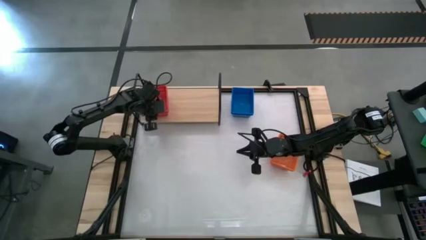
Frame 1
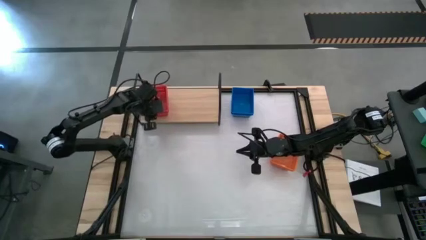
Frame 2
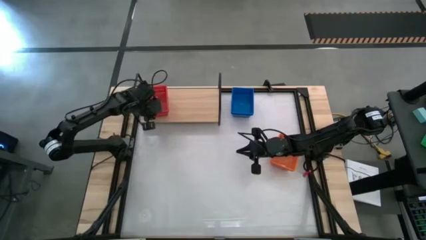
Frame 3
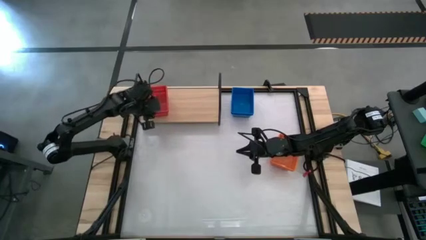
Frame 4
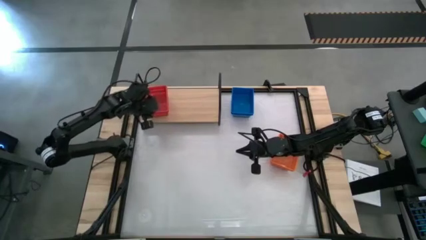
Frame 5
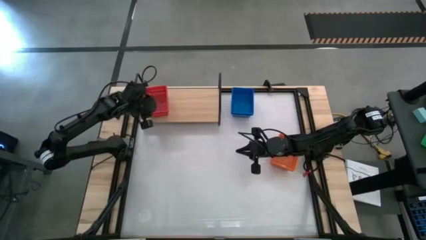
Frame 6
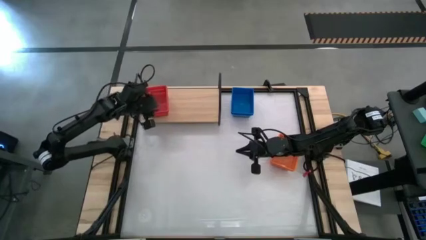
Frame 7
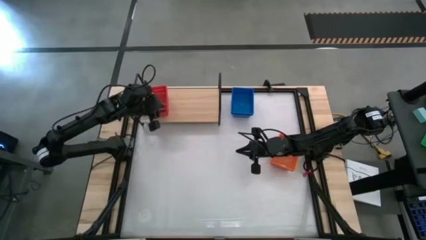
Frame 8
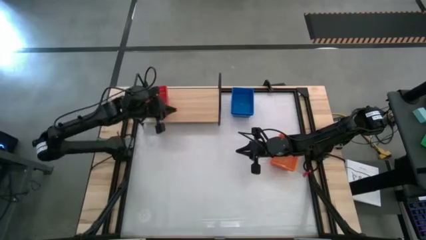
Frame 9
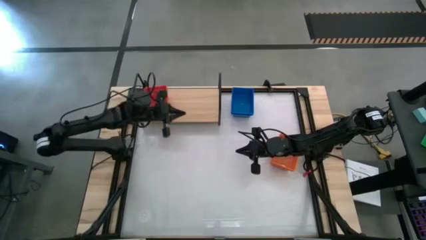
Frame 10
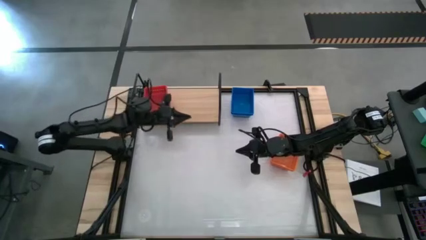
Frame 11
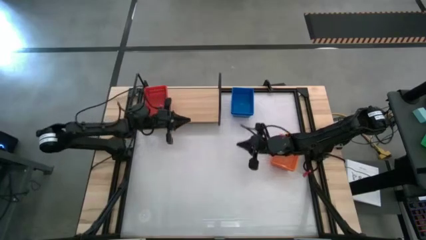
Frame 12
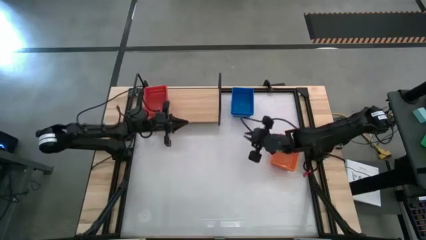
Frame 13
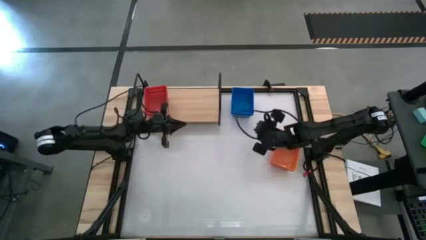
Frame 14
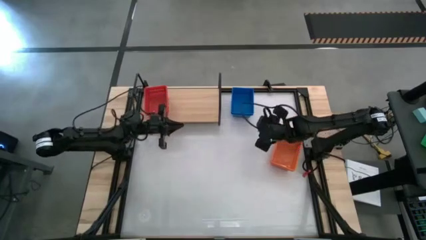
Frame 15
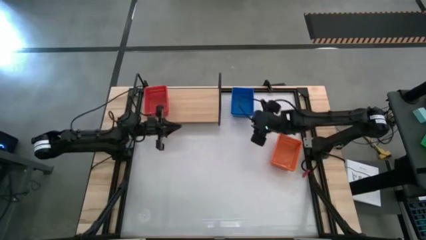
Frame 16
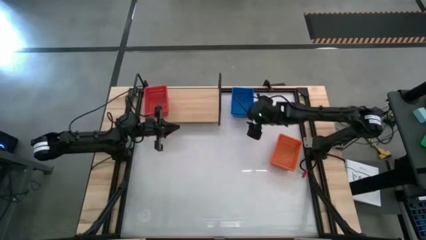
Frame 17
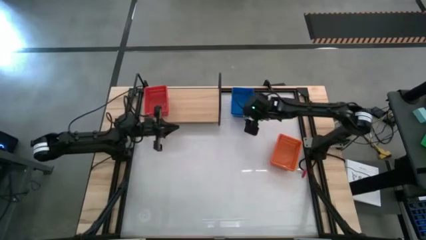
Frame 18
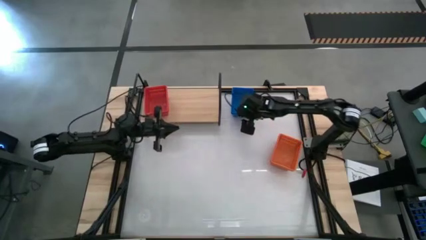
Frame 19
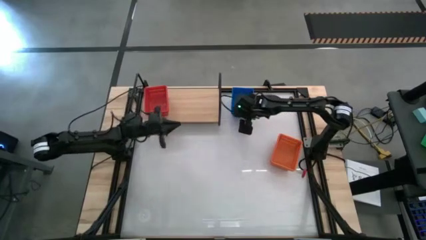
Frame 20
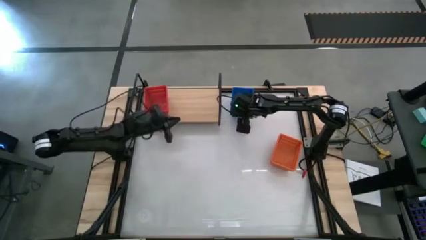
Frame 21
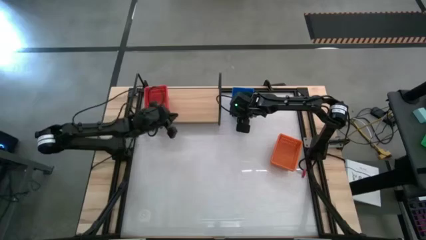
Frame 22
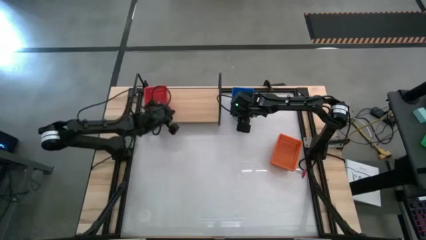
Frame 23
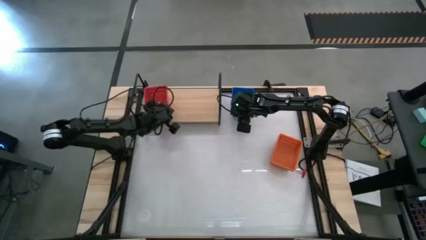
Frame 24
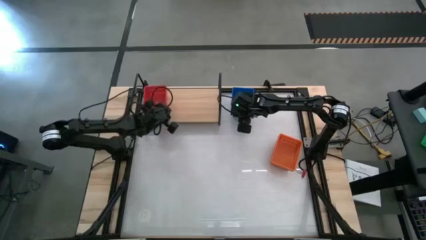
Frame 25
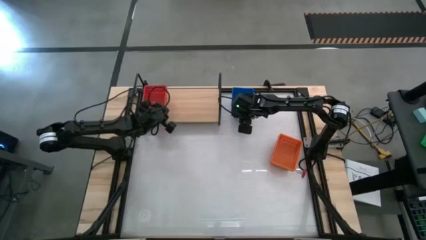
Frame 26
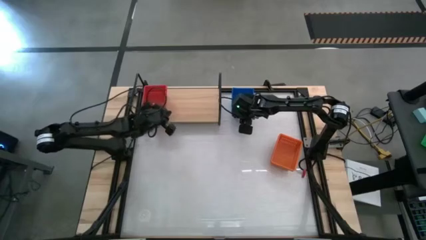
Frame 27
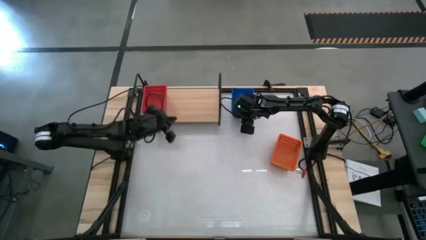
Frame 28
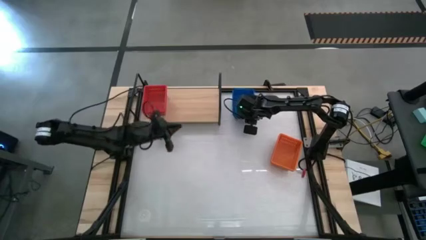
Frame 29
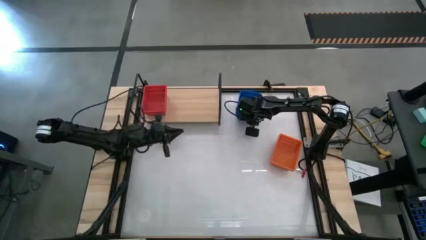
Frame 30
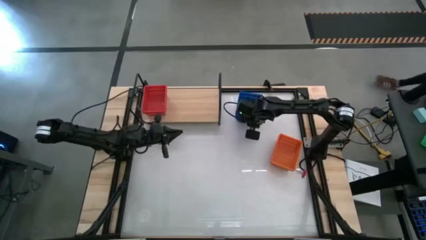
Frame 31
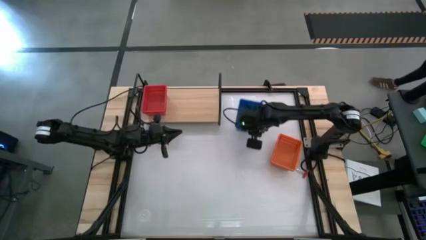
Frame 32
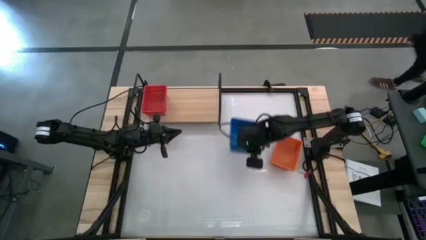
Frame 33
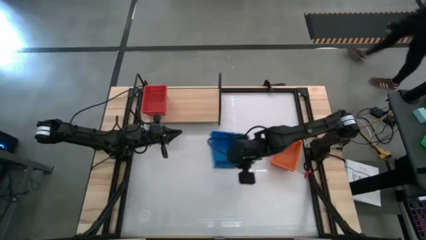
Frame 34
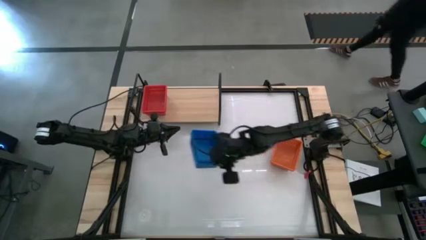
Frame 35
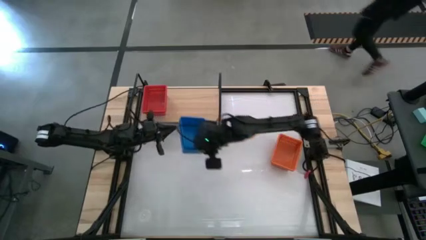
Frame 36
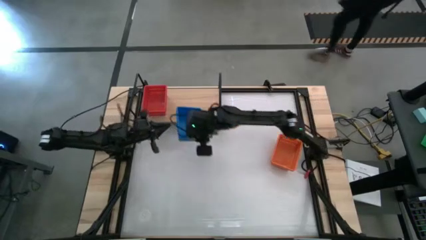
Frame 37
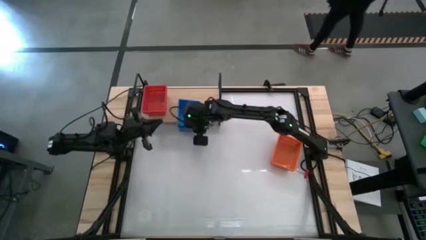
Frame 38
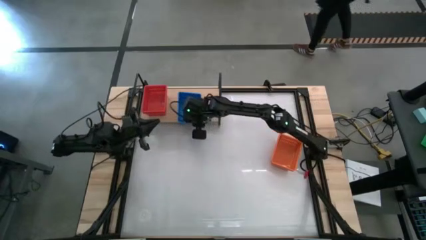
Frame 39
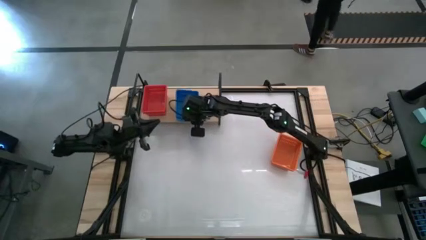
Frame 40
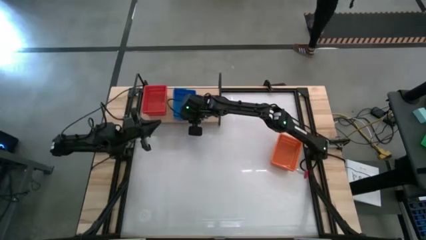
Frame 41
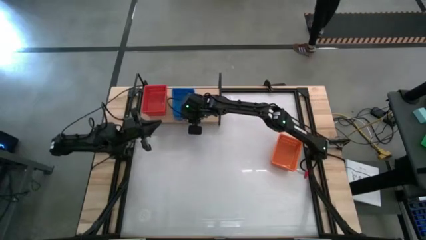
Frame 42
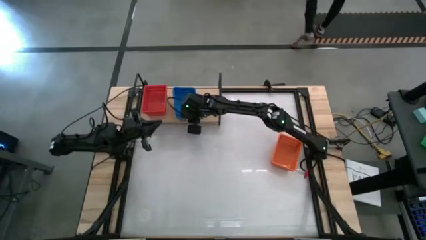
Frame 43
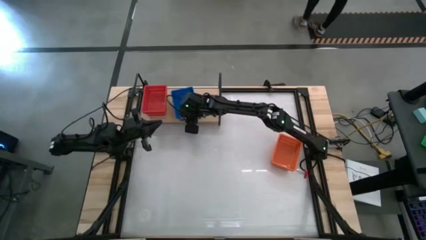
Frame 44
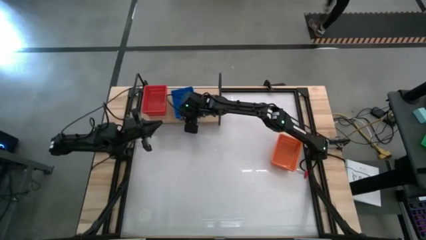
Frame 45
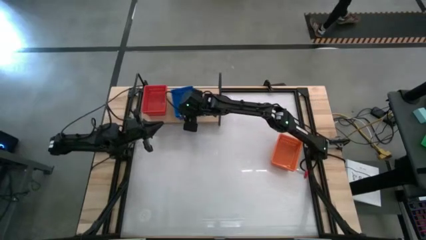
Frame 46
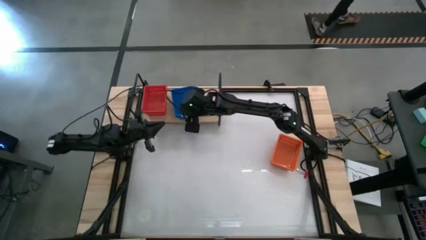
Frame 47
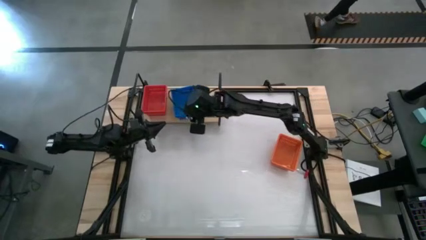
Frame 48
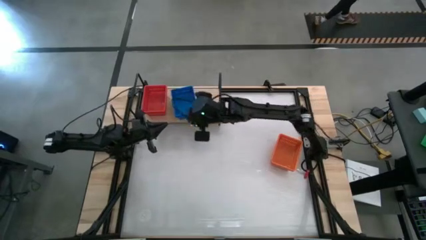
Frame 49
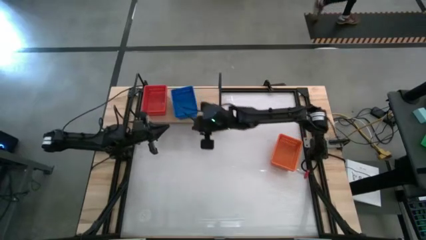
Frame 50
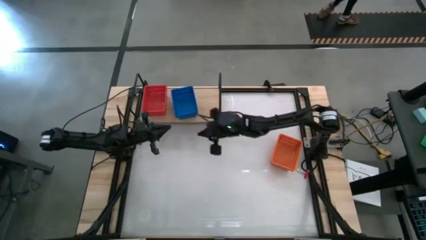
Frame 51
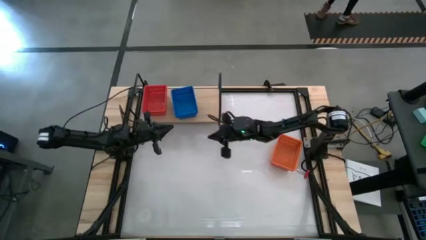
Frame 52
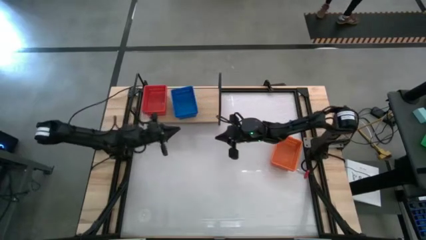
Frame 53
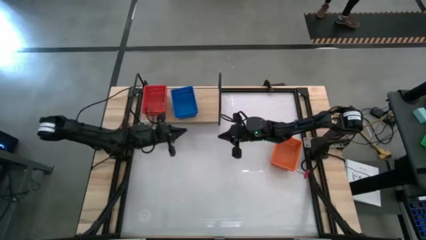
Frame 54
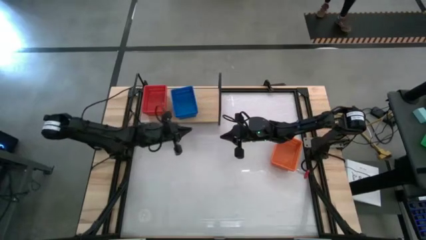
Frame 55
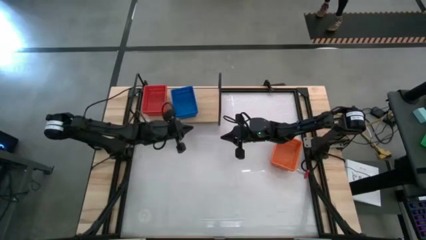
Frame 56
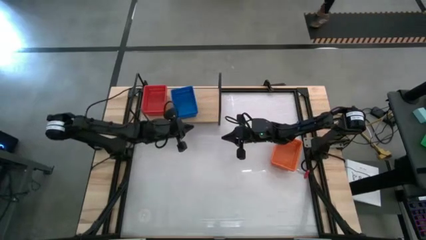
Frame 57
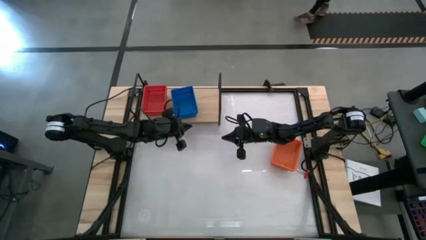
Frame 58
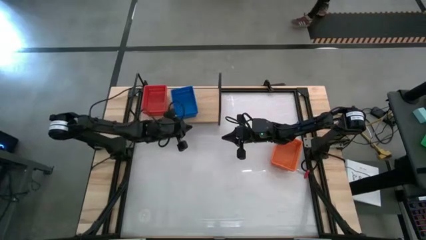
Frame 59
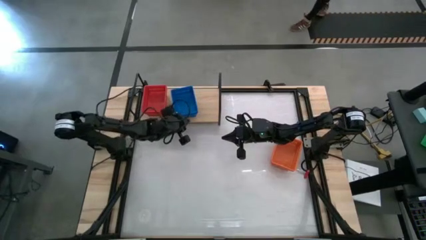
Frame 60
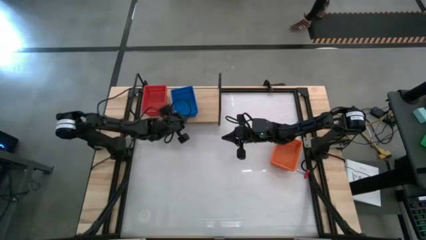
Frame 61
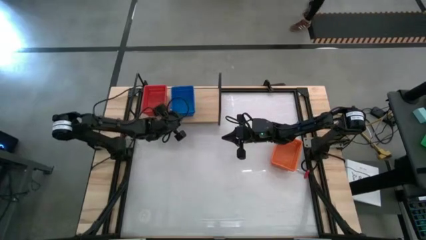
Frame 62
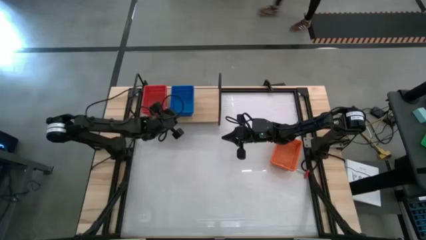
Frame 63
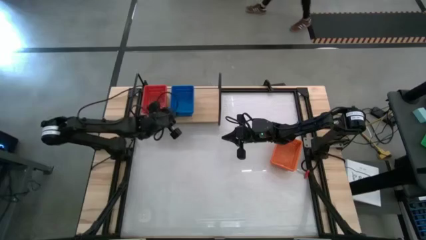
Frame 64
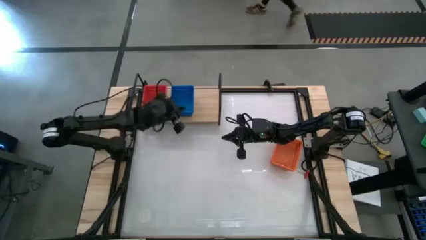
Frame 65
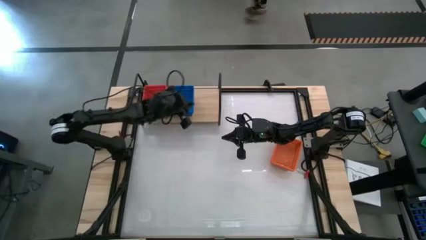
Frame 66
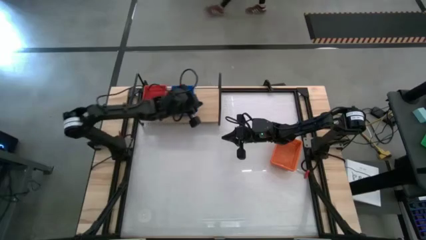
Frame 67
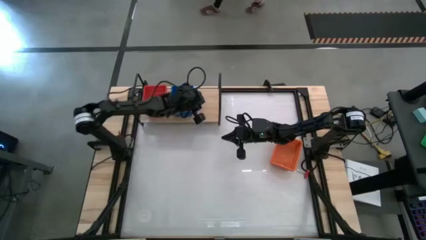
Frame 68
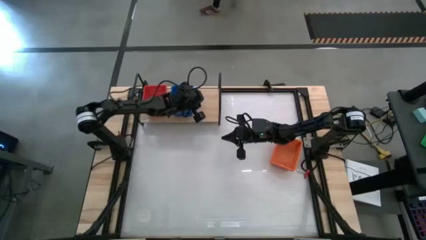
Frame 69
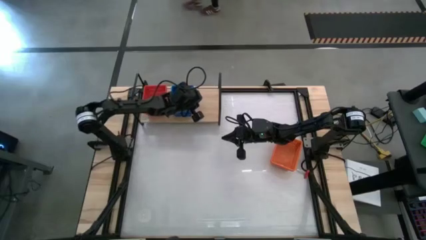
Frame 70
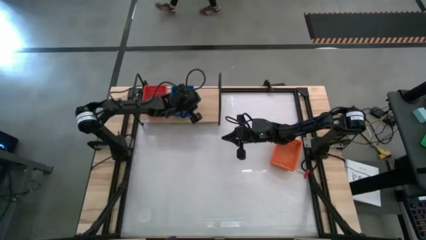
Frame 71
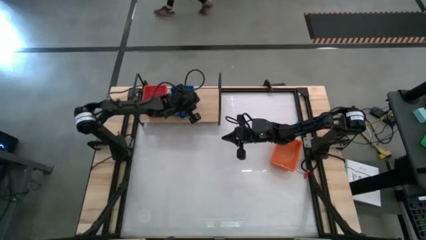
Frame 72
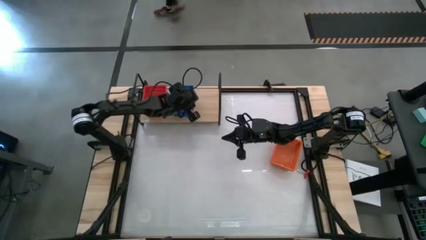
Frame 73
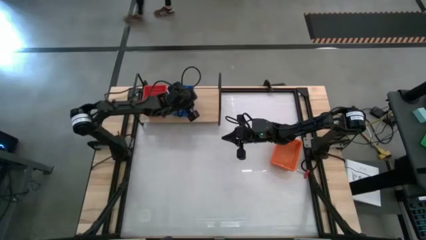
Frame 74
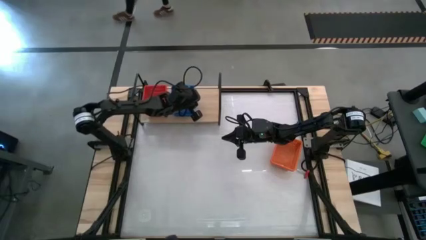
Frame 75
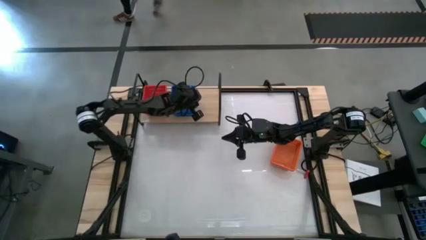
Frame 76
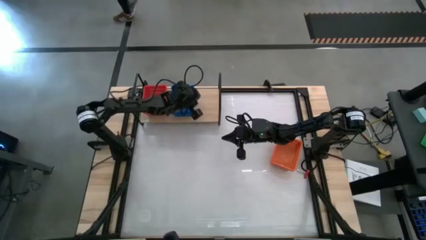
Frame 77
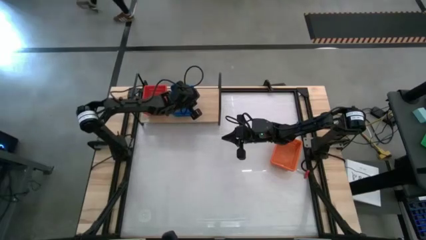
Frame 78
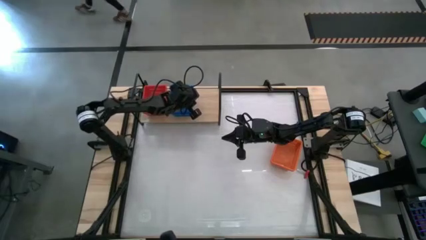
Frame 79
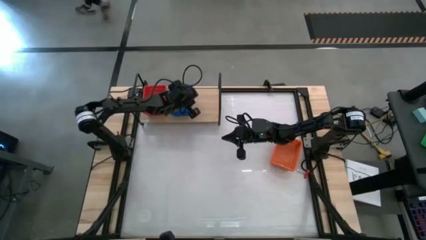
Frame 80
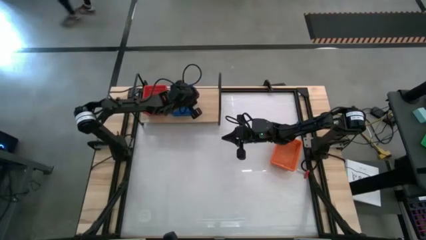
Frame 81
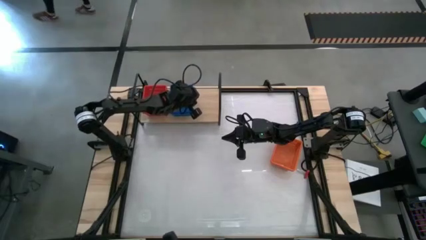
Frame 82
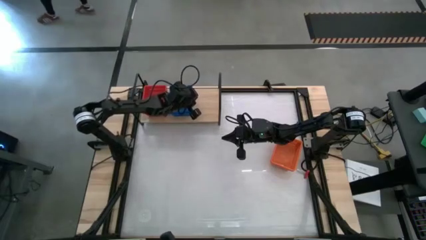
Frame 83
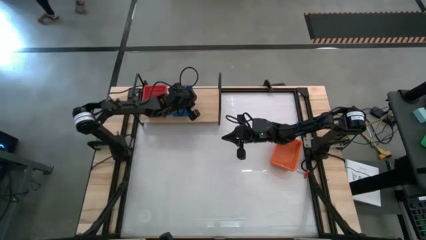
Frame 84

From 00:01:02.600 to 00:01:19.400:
Task: Stack baskets on shelf by color
Put the stacked blue bins on the shelf

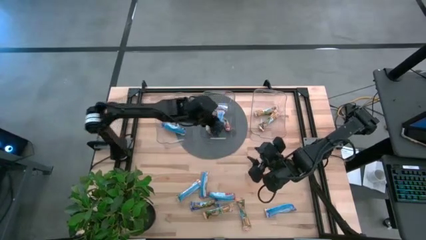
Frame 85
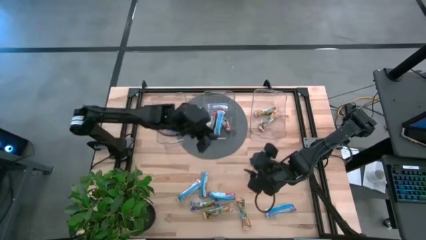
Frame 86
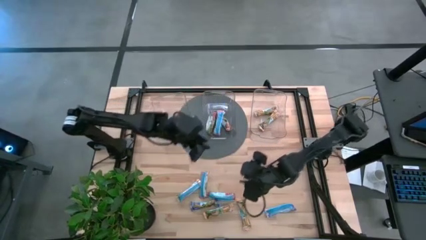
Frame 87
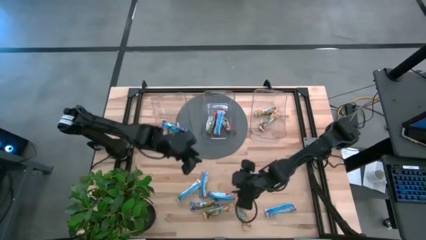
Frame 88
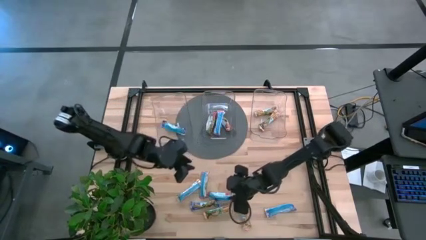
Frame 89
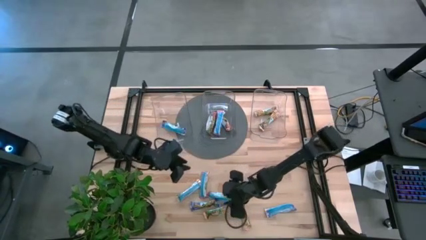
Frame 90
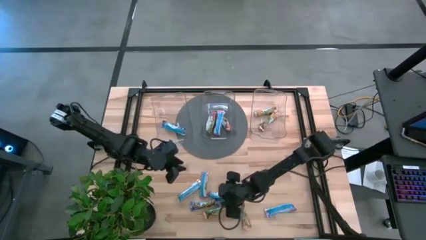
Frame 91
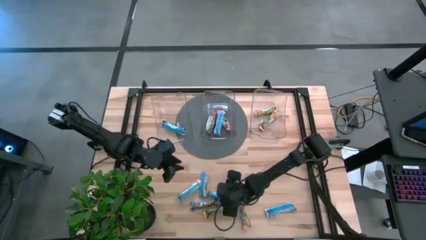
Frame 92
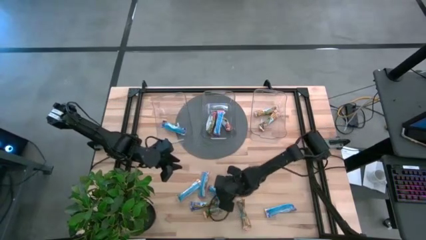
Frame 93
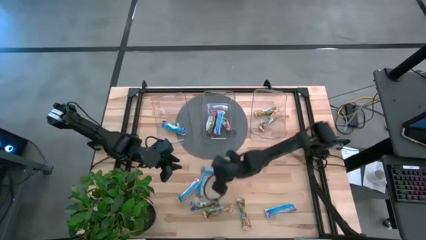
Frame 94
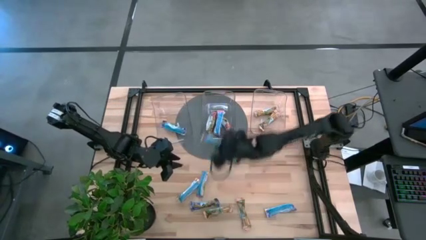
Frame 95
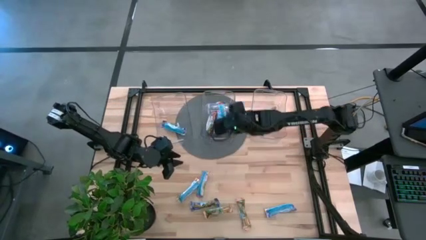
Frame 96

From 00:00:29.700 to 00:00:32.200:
Task: Pick and place Granola Bars by type
Put the red granola bar into the middle transparent bin
